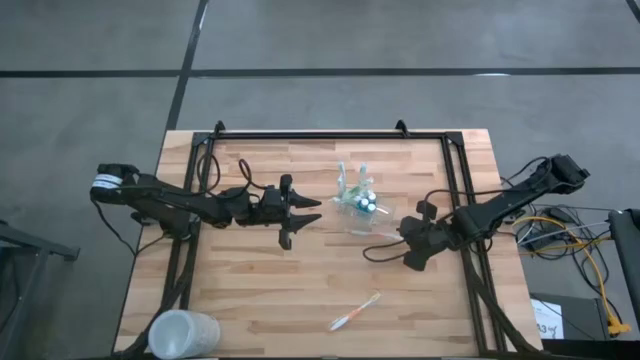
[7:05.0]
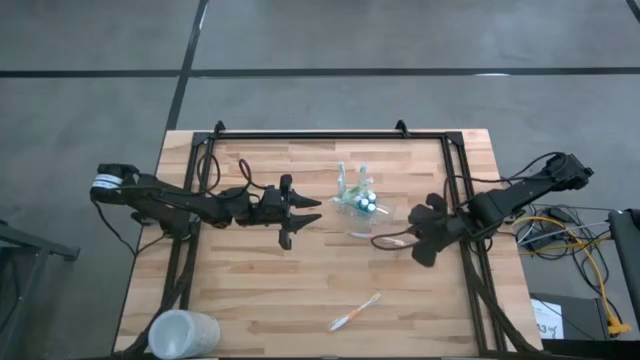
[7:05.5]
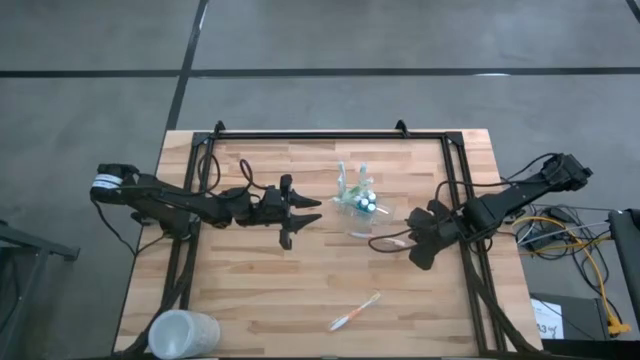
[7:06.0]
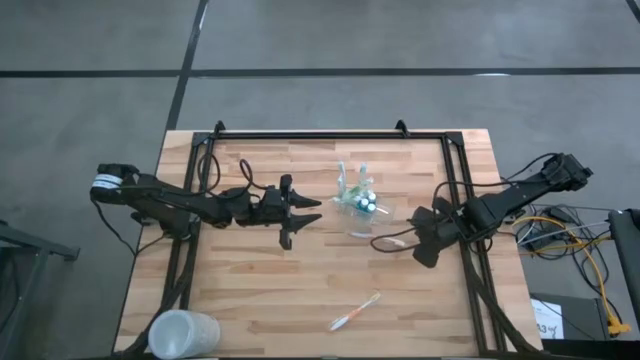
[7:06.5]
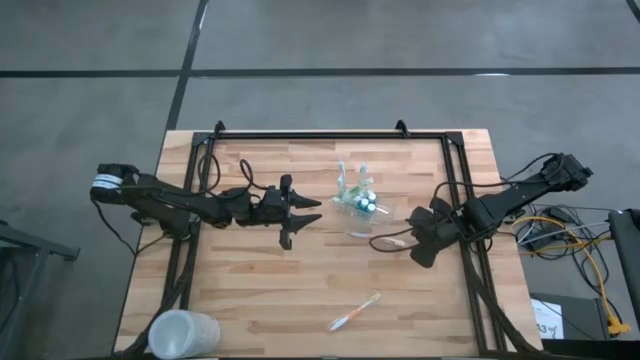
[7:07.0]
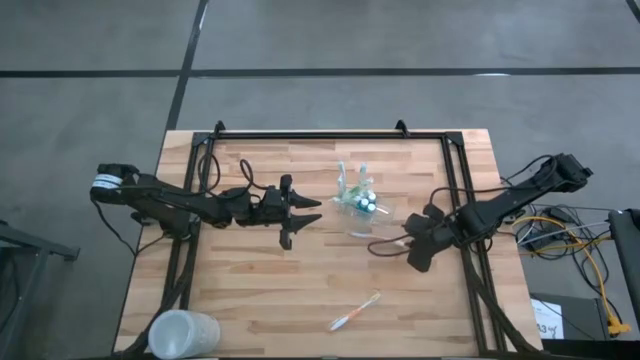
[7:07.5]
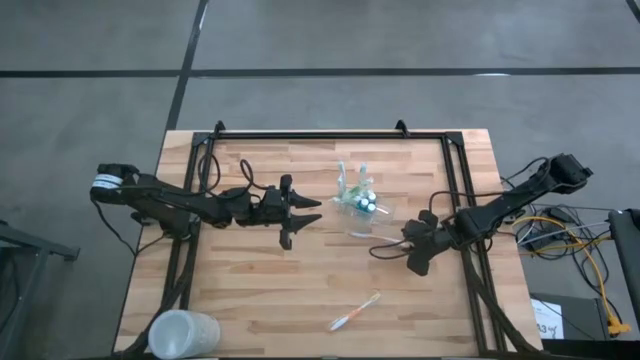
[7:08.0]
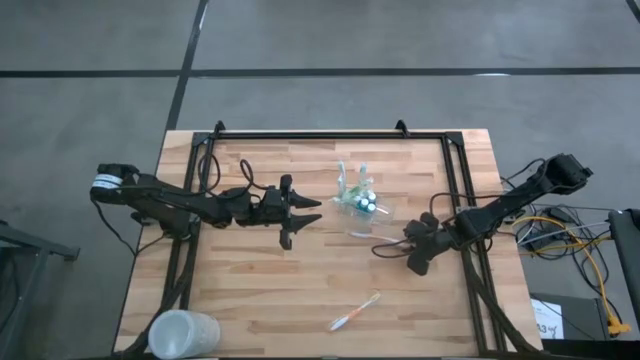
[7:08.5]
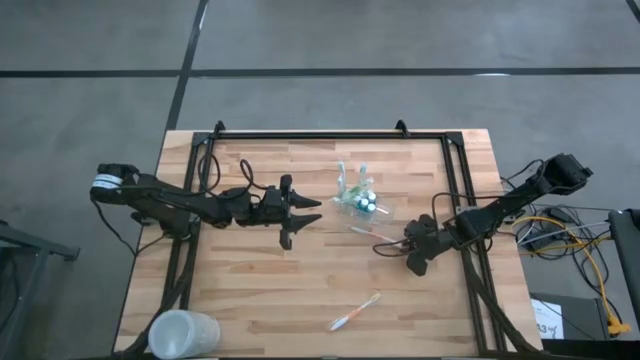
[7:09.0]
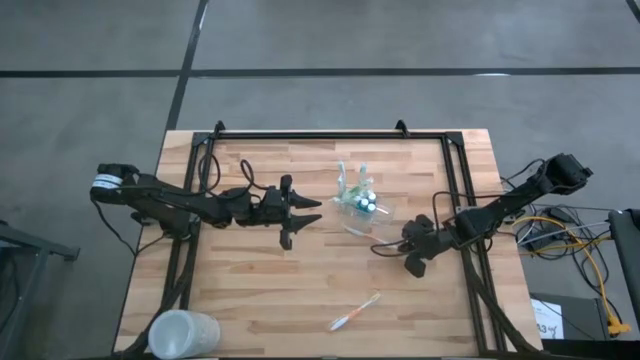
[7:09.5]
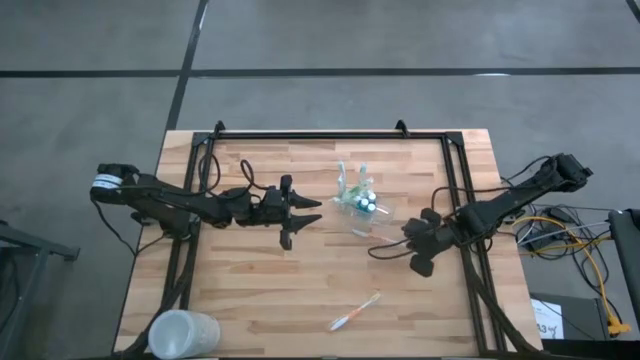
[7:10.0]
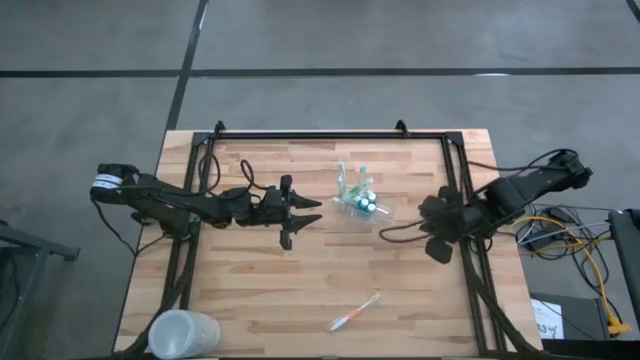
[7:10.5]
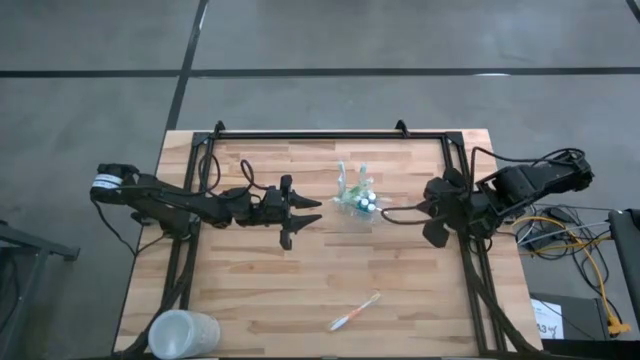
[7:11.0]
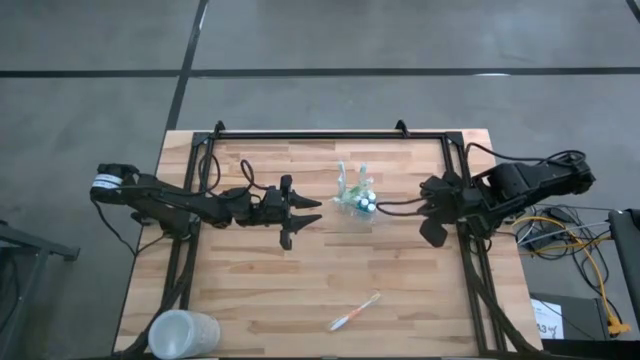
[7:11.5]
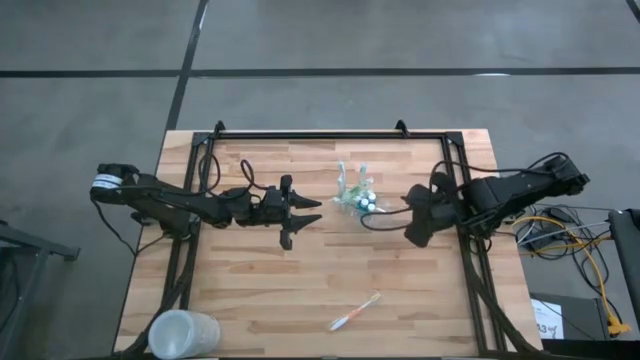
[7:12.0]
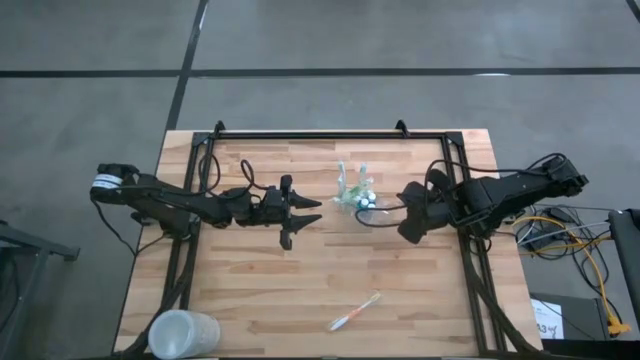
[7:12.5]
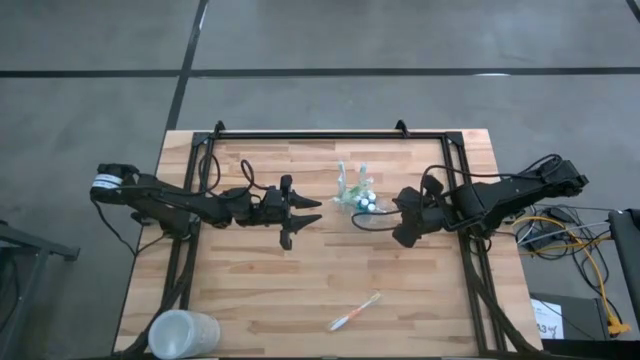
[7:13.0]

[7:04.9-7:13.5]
Task: Pick & Place toothbrushing station
Put the orange toothbrush into the transparent organizer

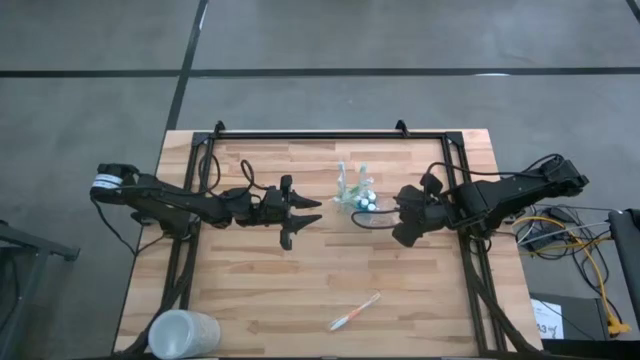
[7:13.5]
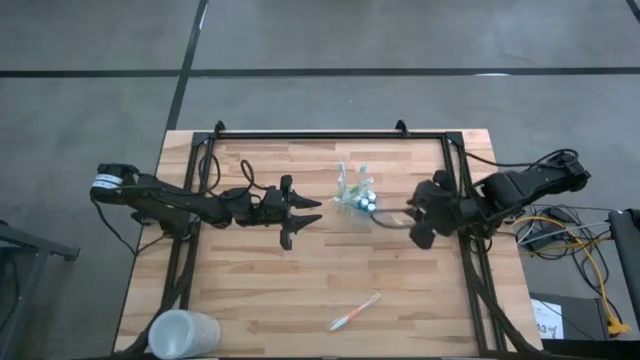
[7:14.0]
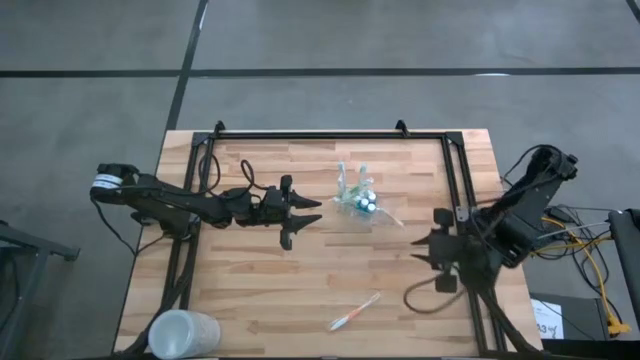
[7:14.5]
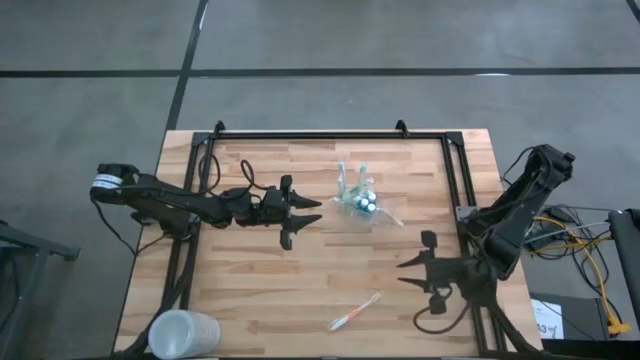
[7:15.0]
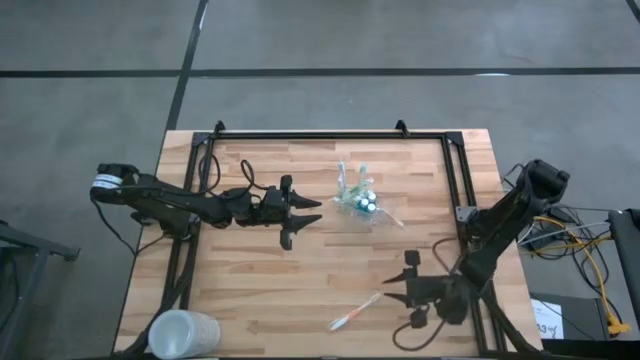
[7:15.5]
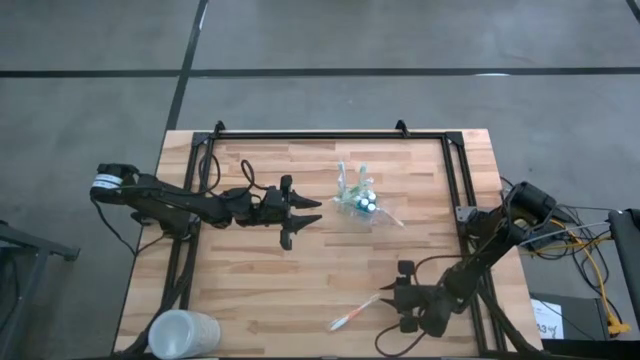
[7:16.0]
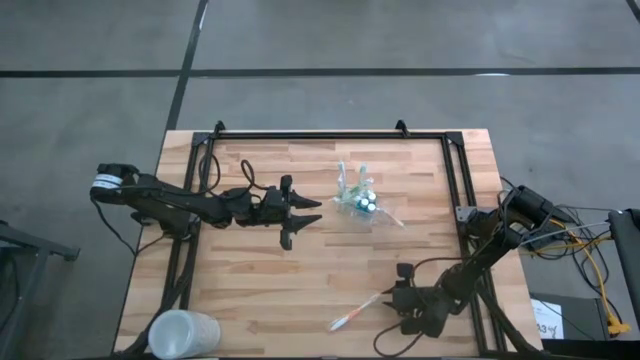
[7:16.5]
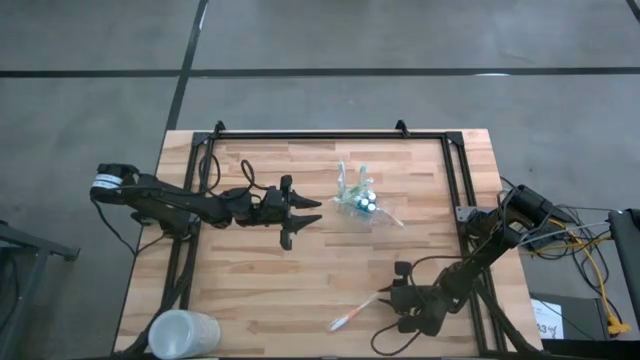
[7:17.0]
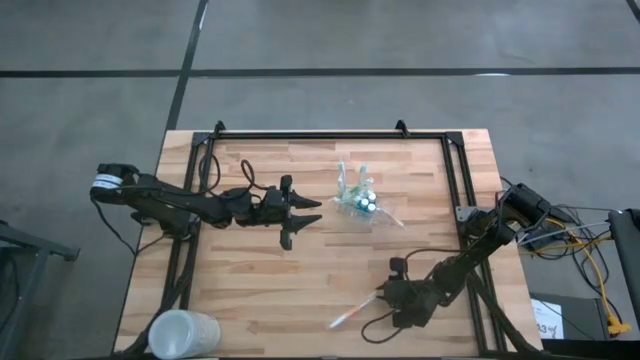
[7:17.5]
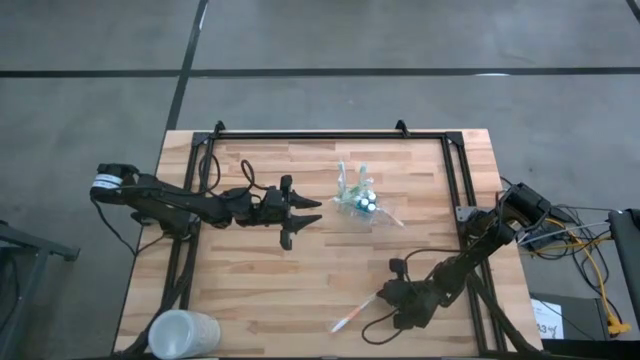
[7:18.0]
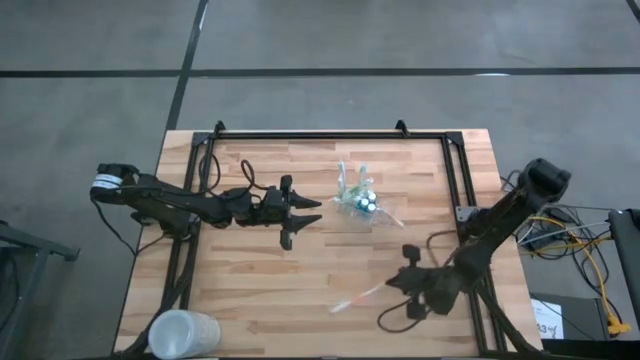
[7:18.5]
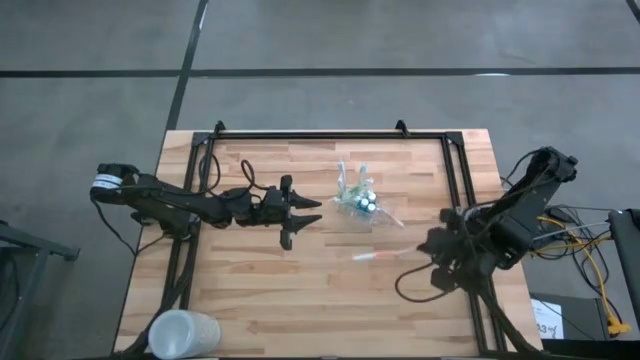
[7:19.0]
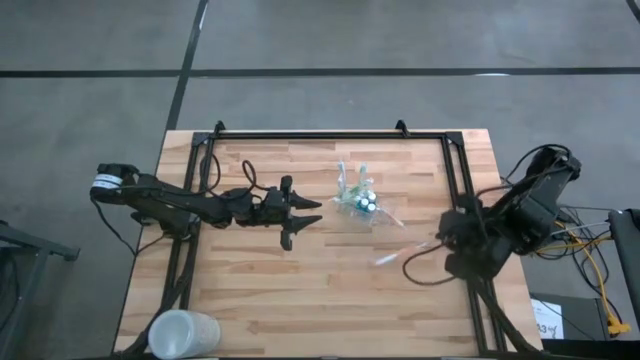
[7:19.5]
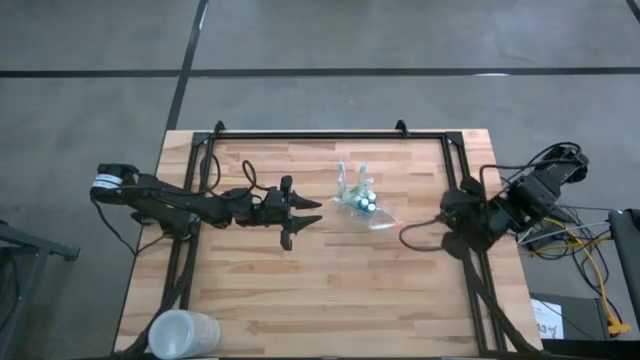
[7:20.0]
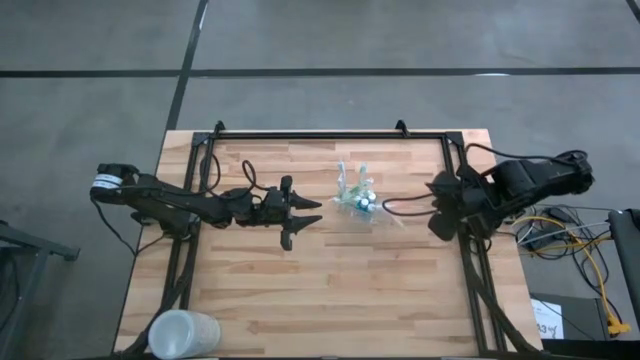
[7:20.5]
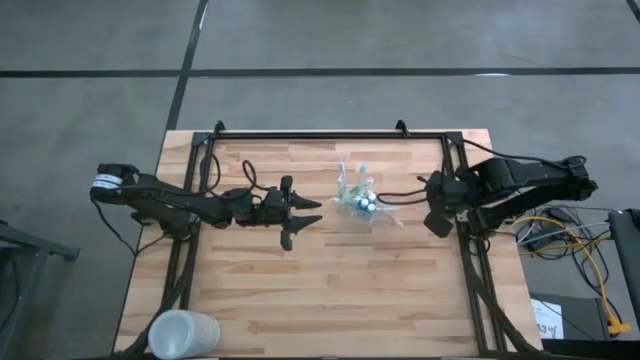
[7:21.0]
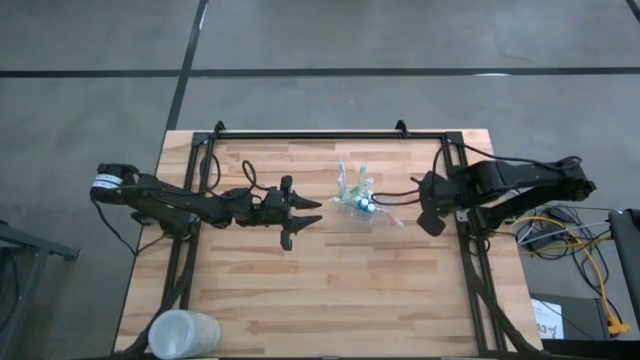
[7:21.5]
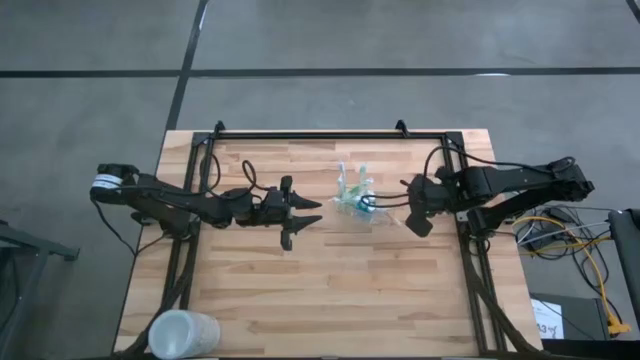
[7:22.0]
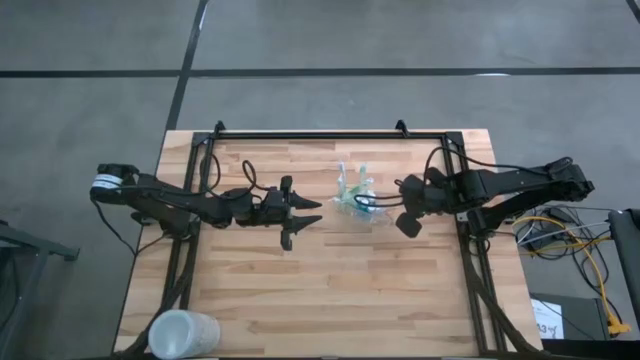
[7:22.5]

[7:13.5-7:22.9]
Put the orange toothbrush into the transparent organizer
